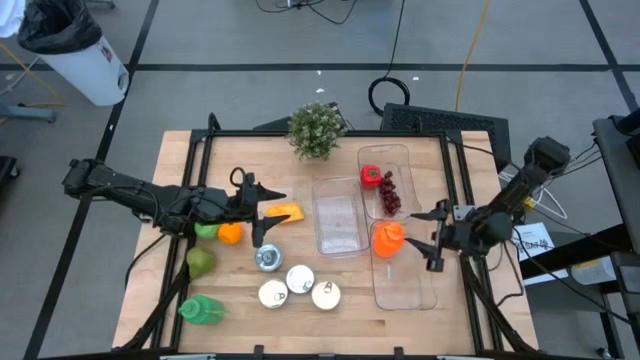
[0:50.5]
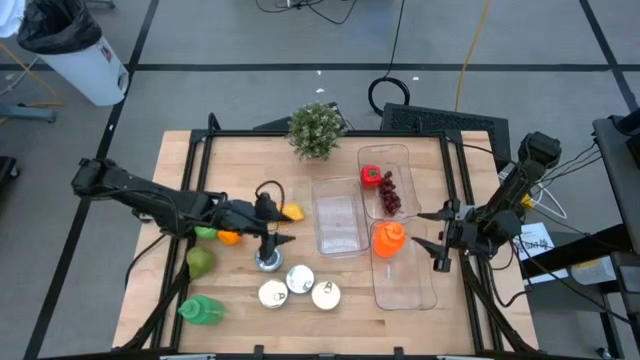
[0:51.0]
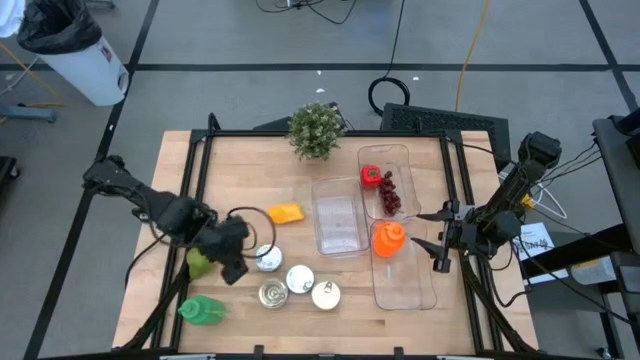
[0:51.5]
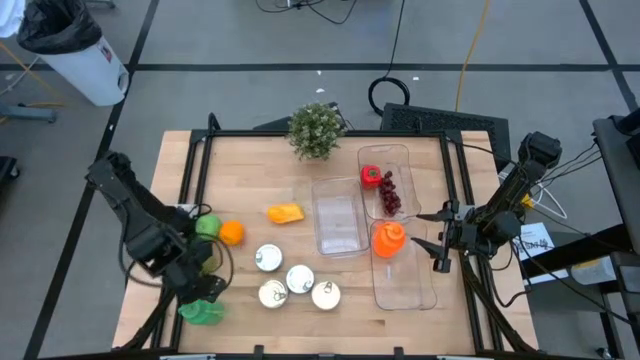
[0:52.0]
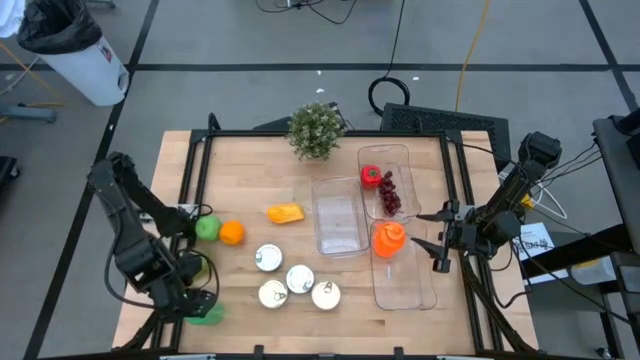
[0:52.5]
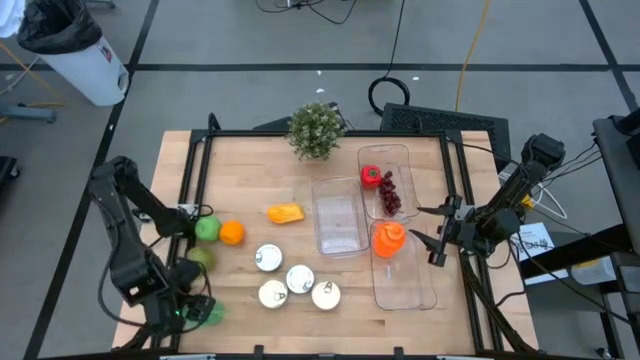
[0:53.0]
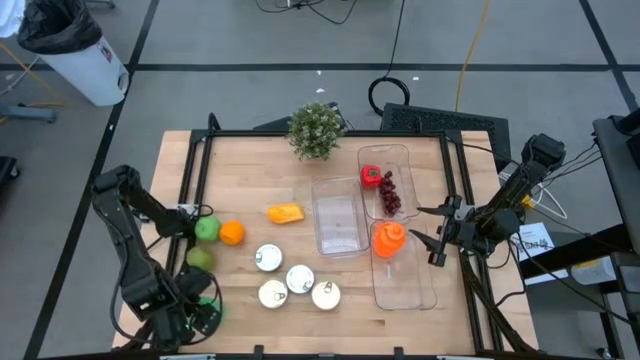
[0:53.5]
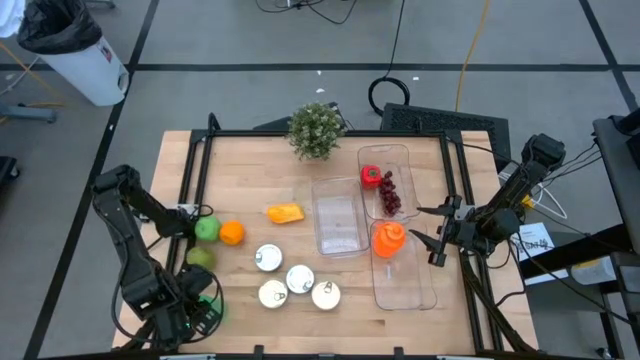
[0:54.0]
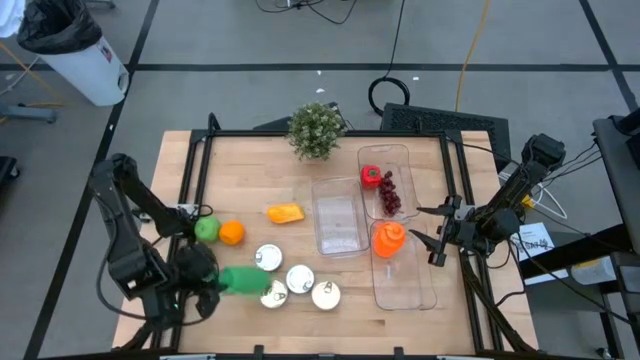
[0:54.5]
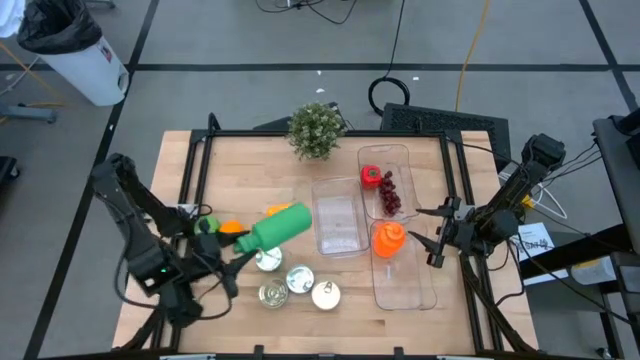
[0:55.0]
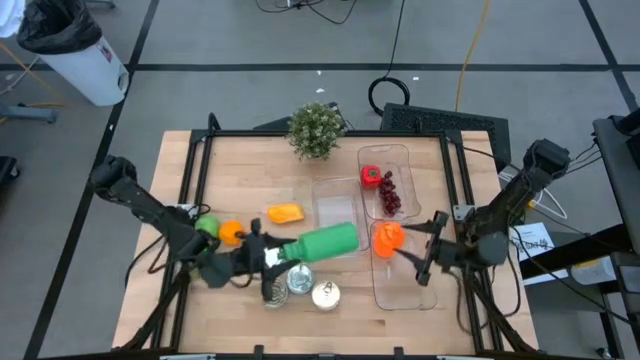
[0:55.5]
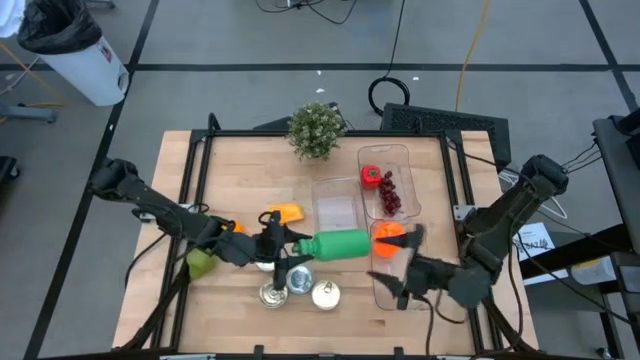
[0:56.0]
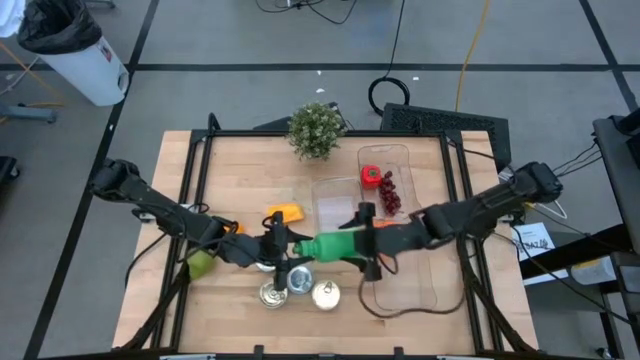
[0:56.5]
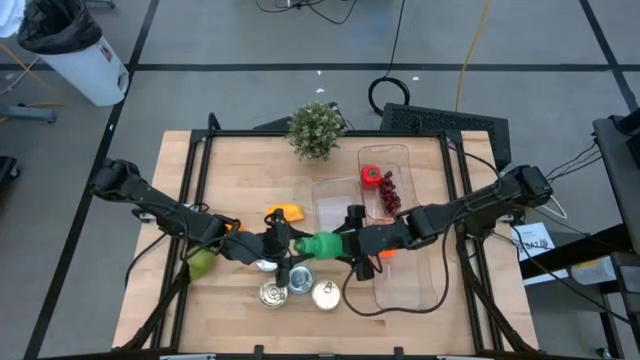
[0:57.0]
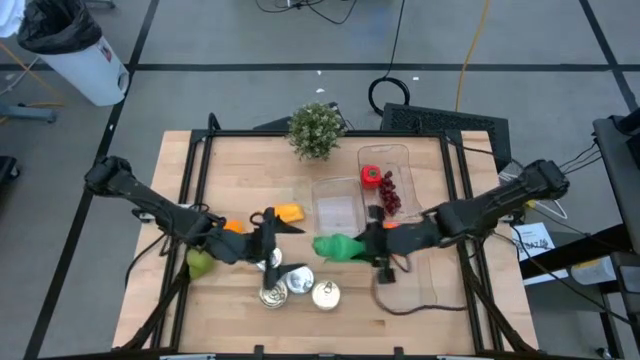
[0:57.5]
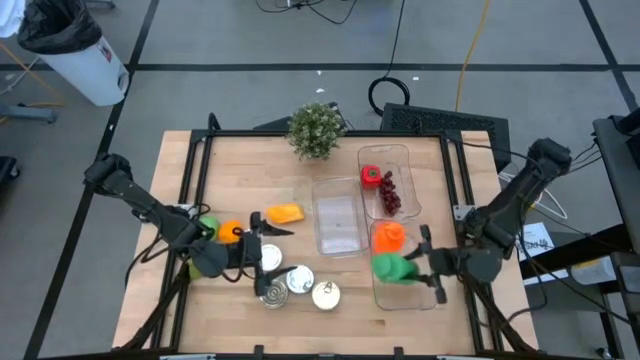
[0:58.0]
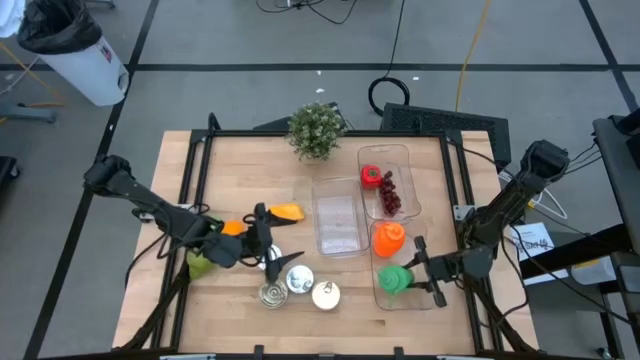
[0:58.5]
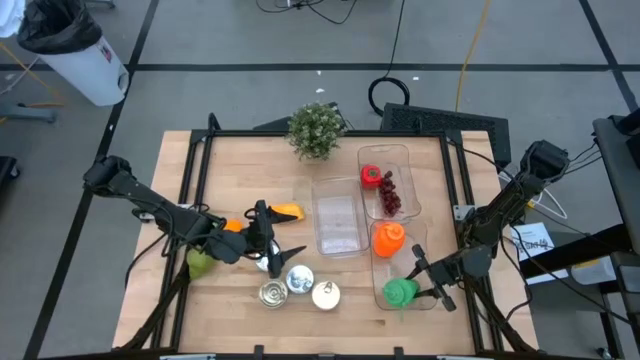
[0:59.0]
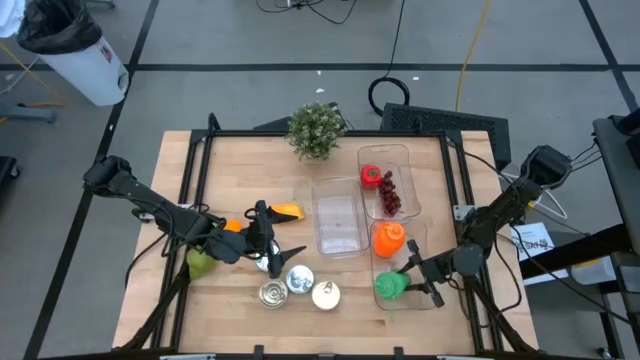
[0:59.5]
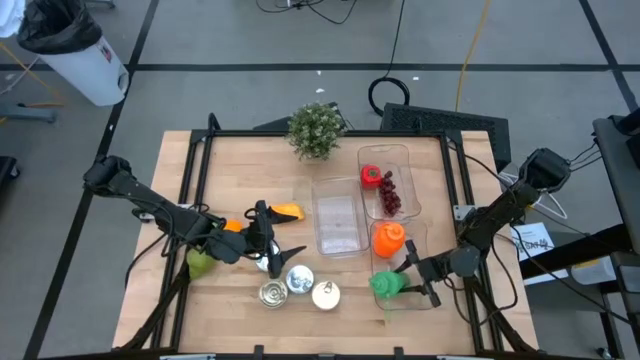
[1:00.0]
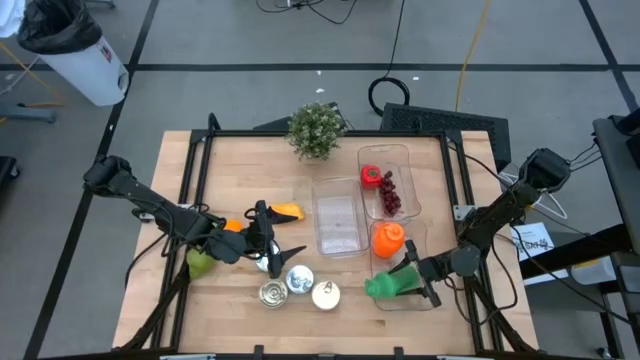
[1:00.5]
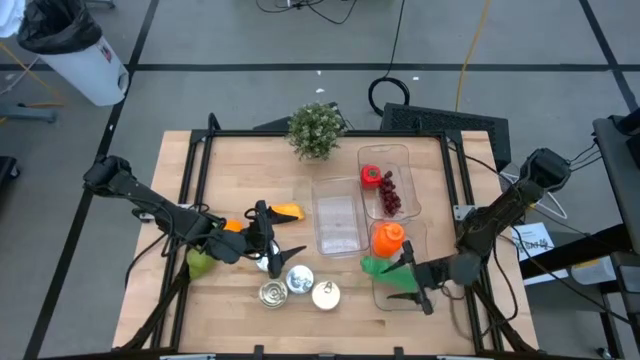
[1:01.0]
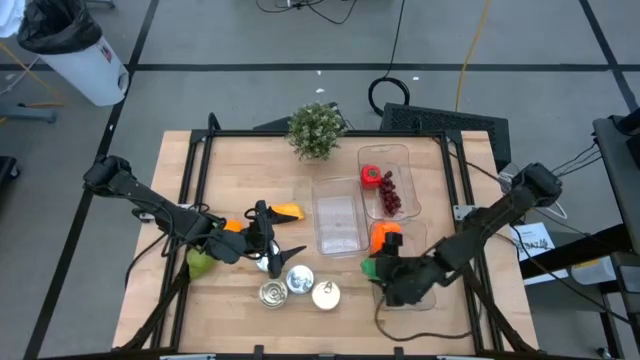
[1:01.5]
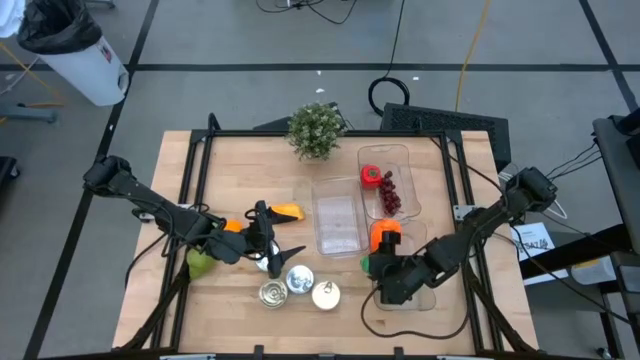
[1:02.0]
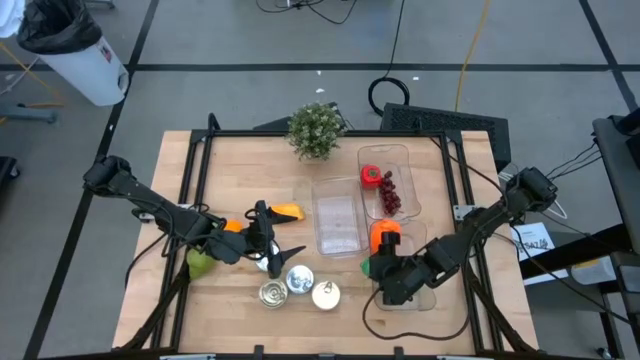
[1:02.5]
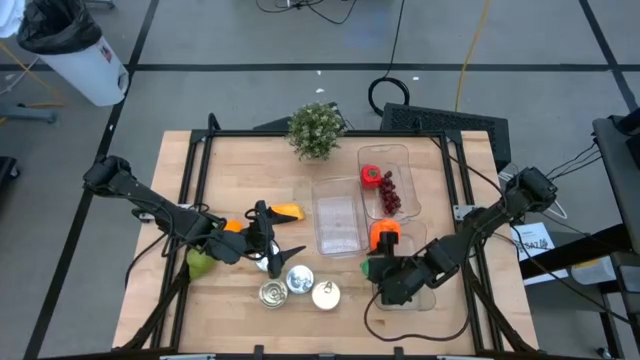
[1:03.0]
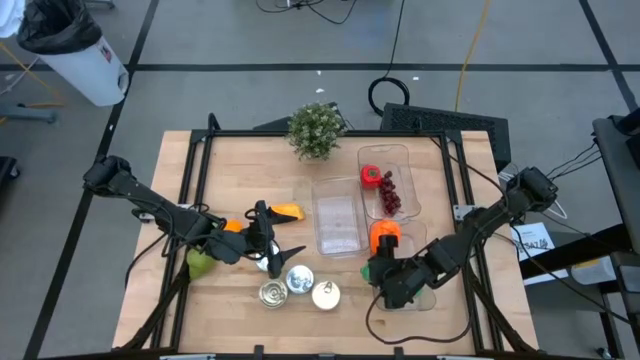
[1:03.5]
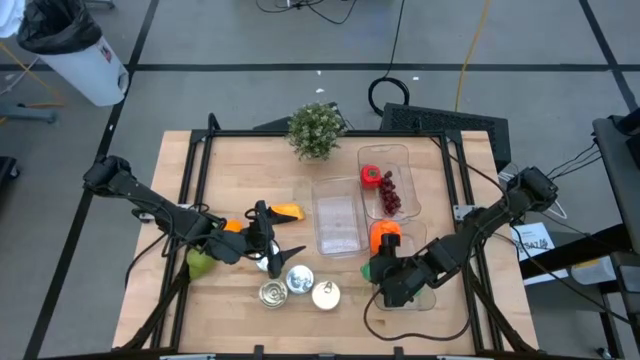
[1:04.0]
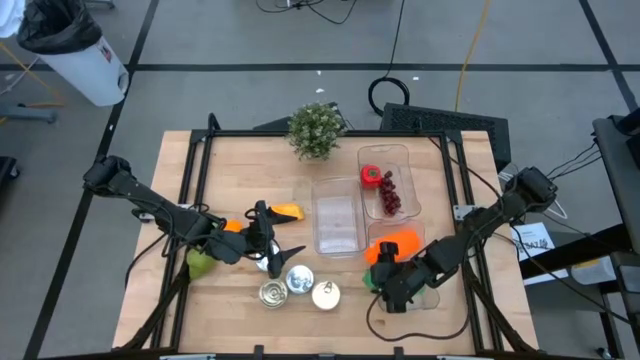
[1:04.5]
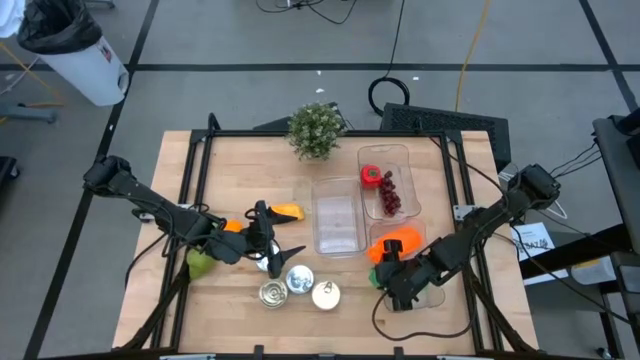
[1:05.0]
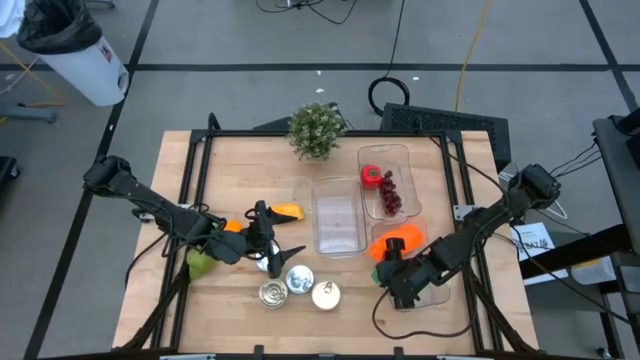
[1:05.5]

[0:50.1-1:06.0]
Task: Pick & Place Food Item
Put the green water bottle into the bottom transparent bin

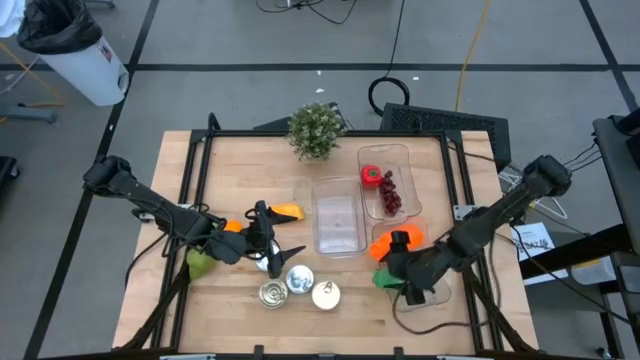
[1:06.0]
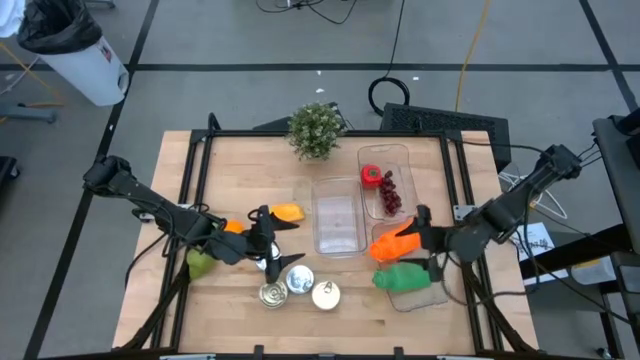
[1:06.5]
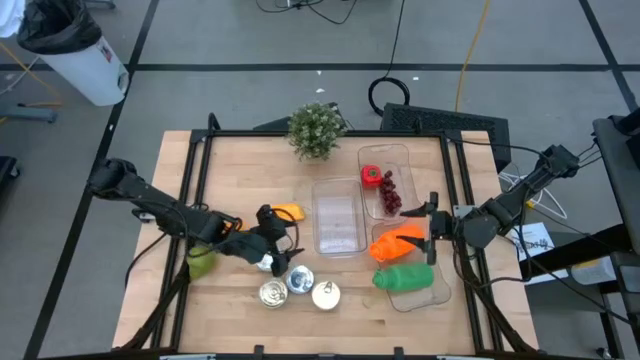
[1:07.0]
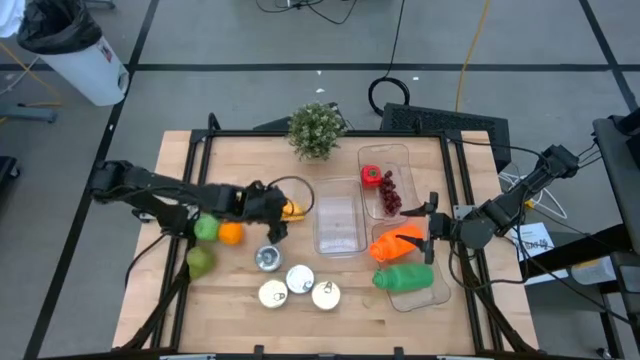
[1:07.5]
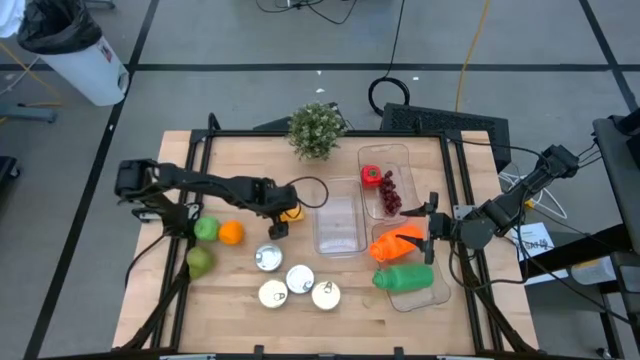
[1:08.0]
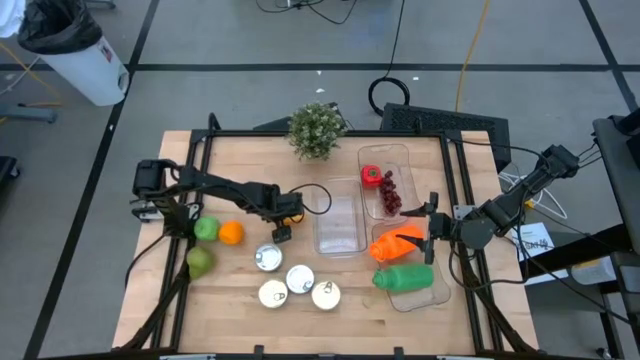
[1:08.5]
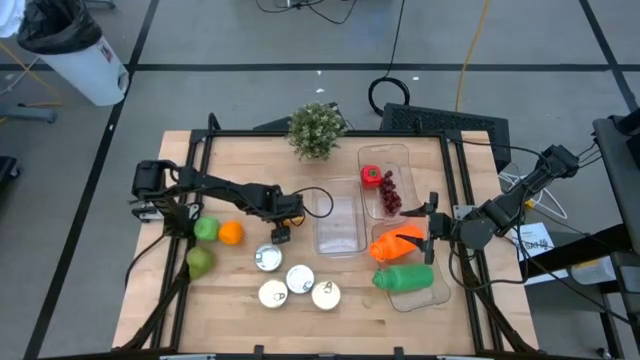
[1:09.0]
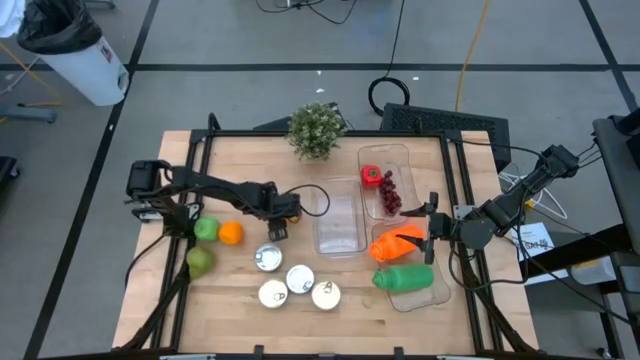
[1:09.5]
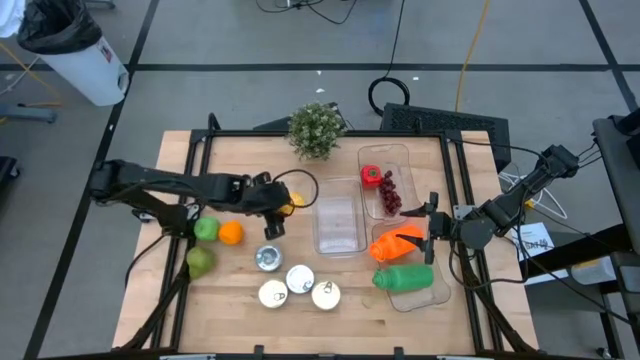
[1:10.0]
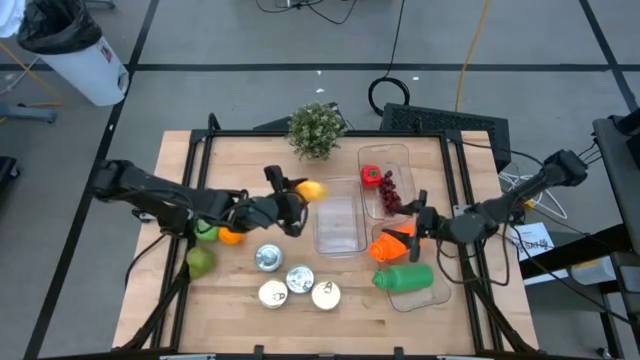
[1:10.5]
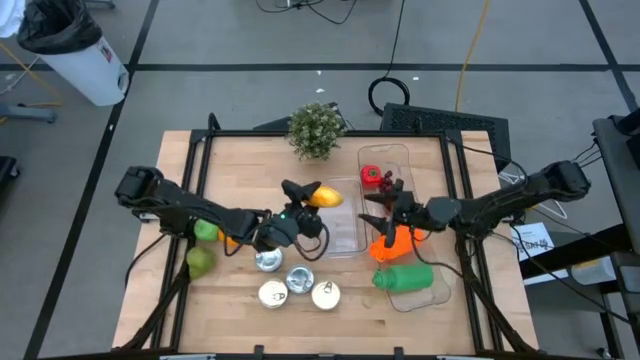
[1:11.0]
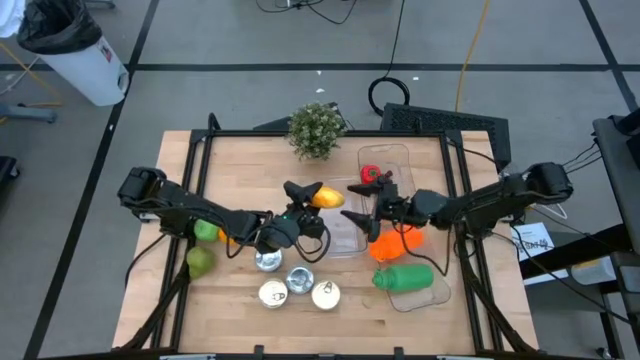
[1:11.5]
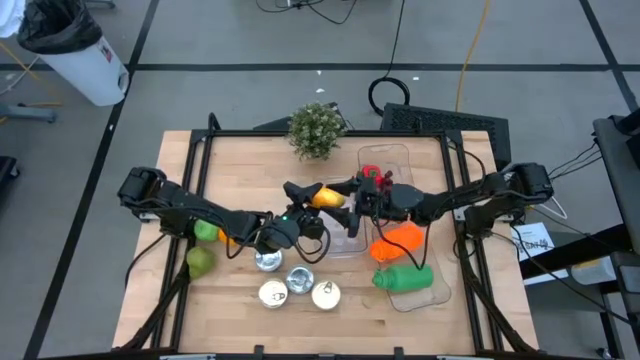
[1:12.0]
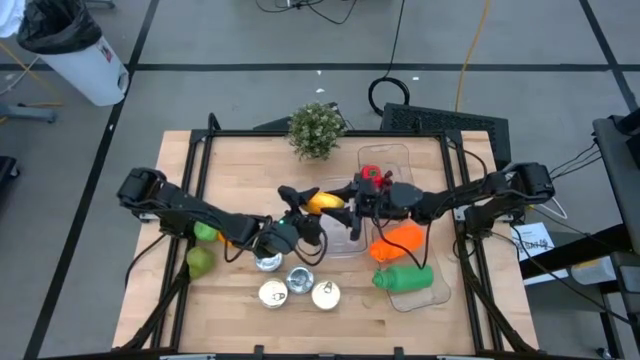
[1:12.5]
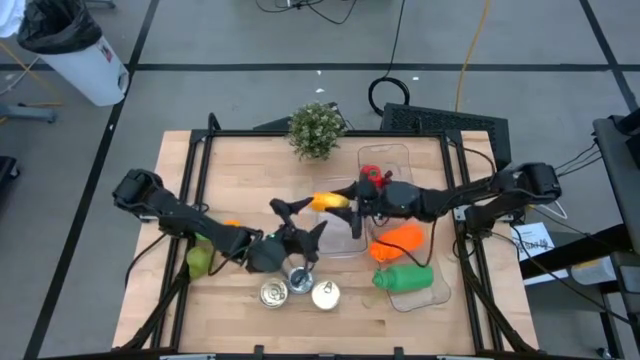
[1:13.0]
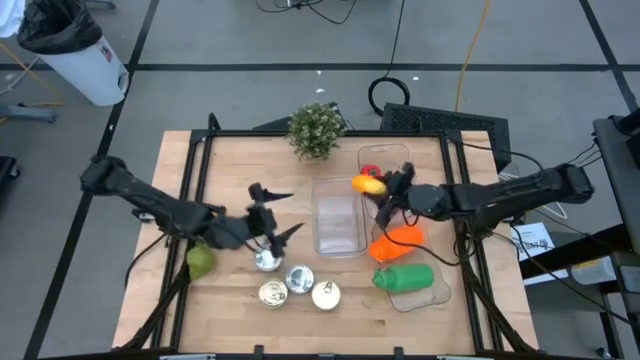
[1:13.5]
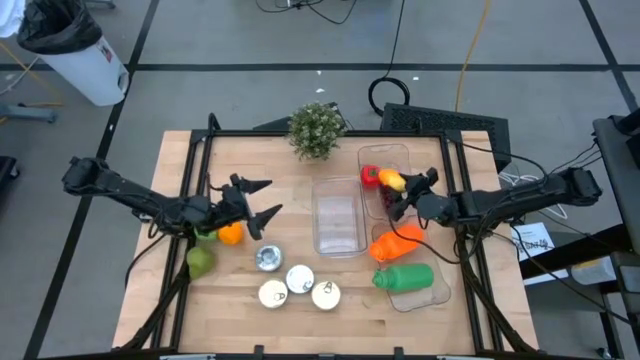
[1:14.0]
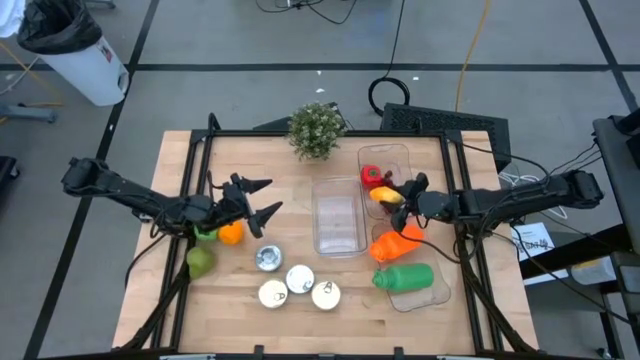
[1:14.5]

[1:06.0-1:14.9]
Put the yellow mango into the top transparent bin
